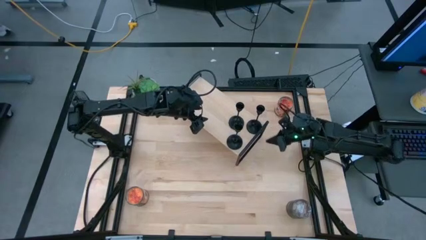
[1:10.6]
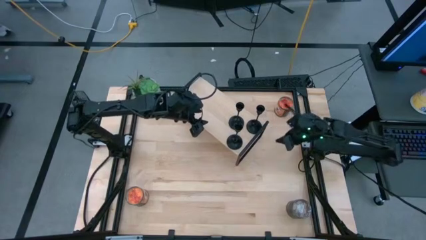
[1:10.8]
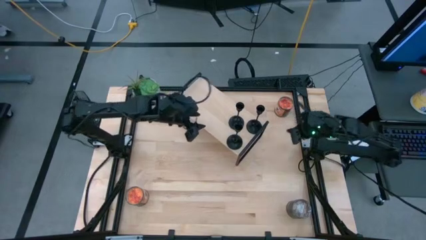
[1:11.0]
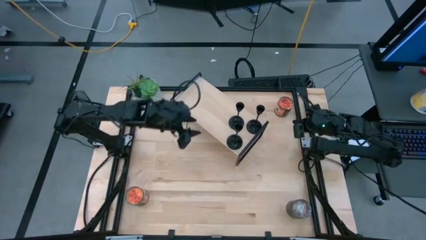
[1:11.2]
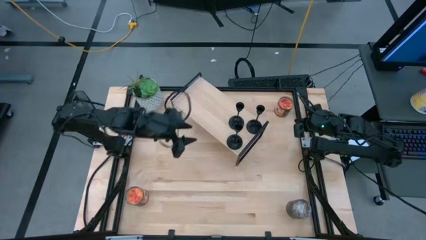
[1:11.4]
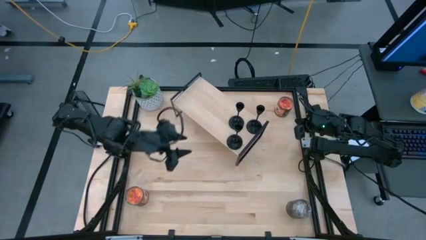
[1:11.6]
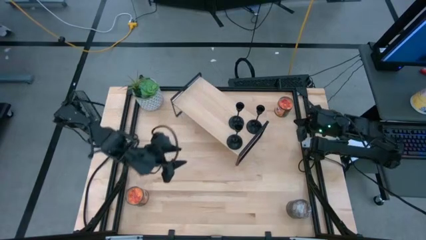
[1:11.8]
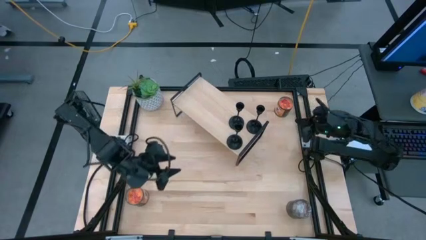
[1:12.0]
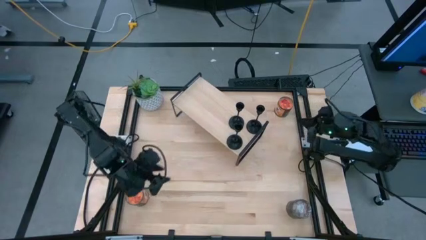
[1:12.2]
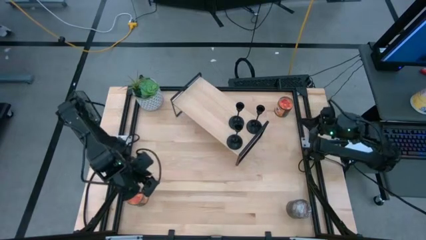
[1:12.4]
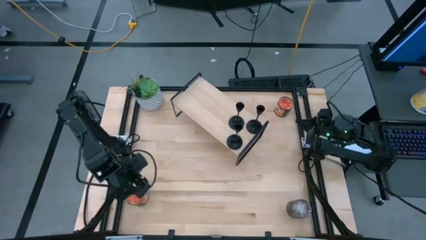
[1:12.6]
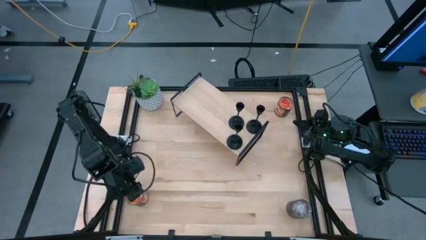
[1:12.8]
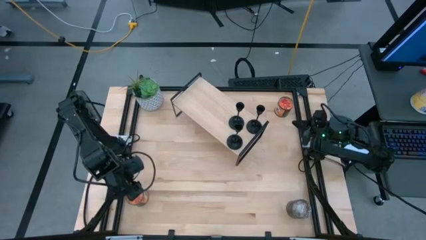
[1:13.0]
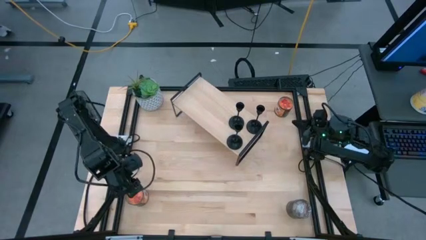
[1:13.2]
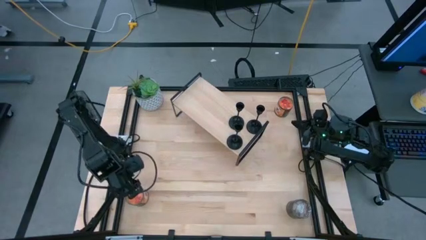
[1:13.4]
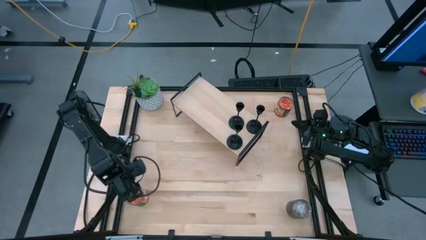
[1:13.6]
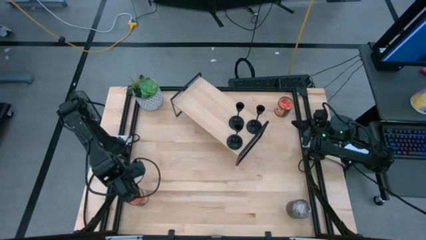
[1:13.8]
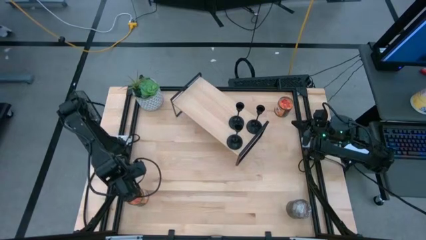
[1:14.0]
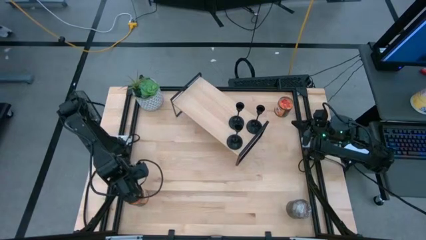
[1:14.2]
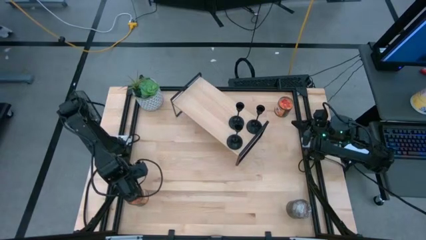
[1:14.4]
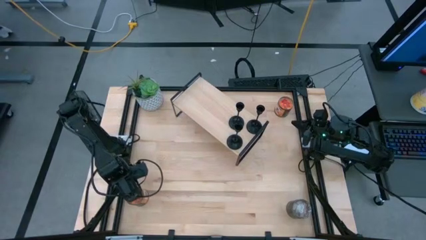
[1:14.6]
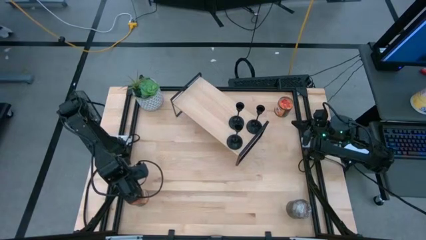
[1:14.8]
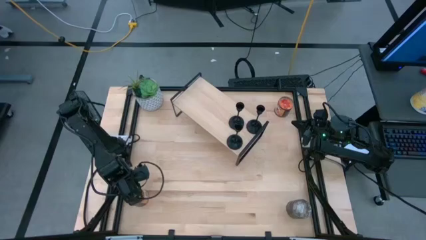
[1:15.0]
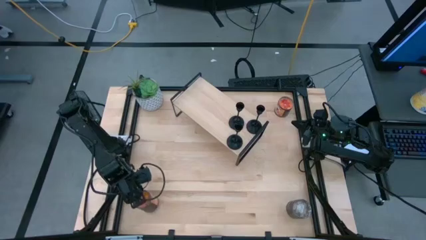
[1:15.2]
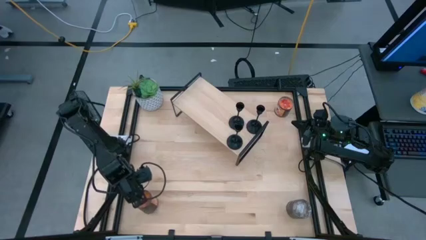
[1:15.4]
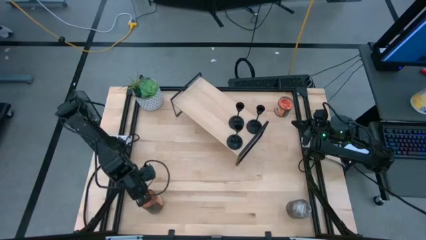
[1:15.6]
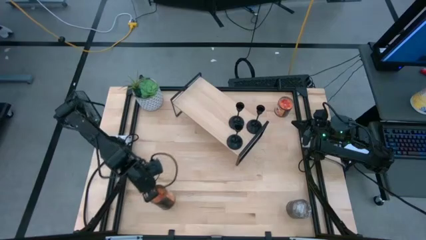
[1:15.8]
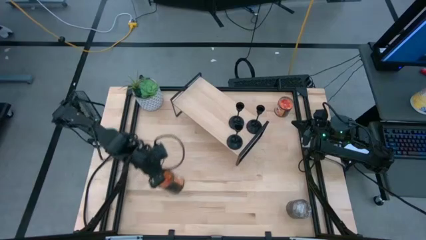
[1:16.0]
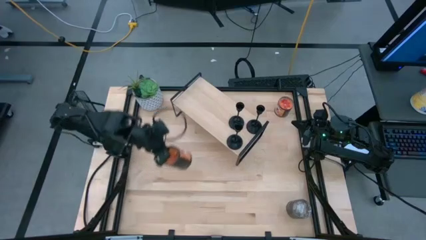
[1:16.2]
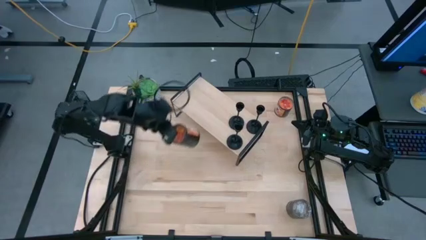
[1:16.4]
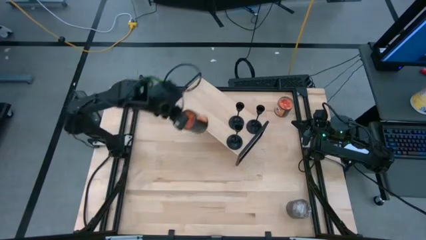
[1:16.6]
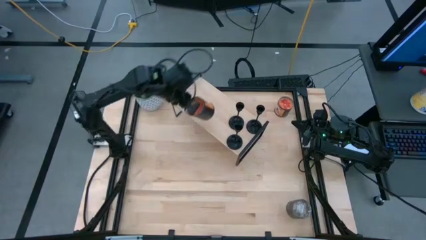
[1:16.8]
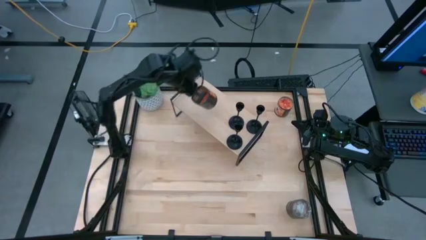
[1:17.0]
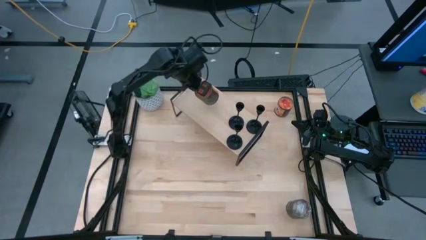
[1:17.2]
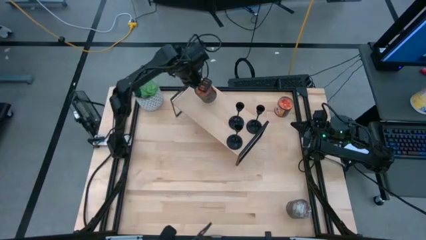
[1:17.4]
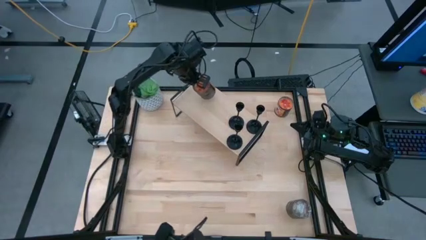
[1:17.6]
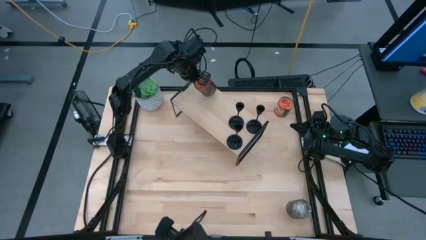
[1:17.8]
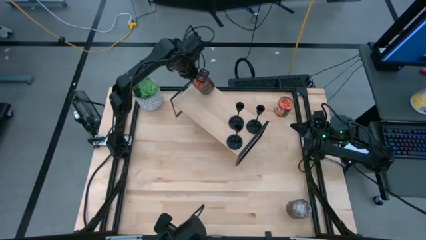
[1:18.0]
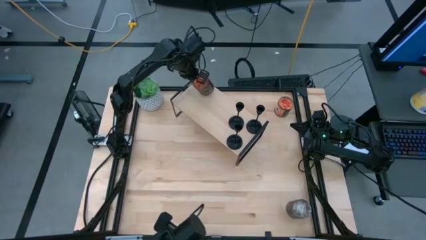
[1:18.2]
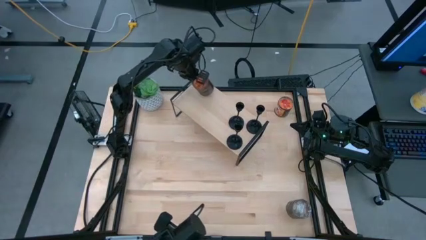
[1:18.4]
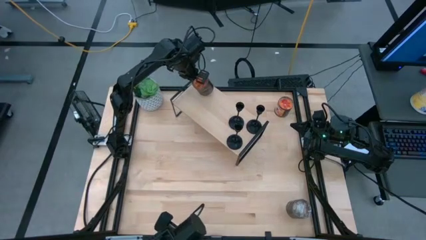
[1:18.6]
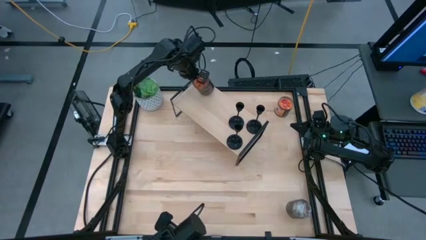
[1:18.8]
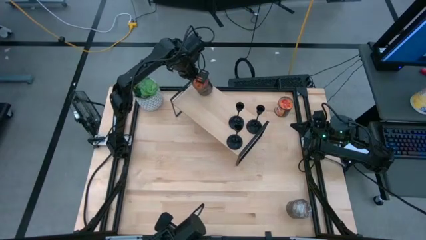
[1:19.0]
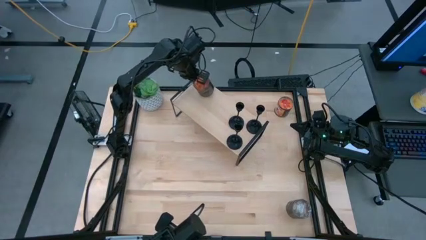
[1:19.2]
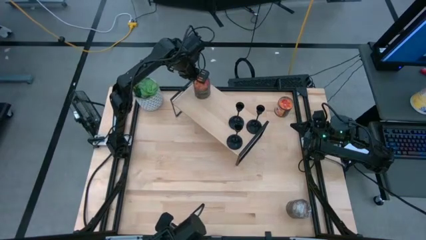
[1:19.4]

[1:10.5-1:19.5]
Task: Pick & Place candle stick holders
Put the bottom orange scented candle on the shelf
